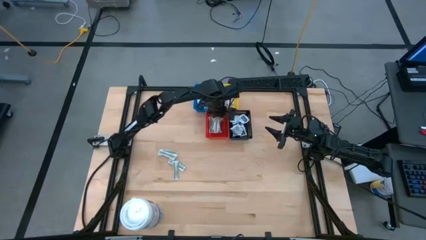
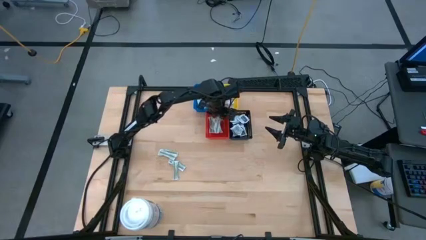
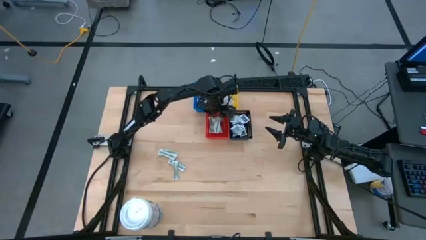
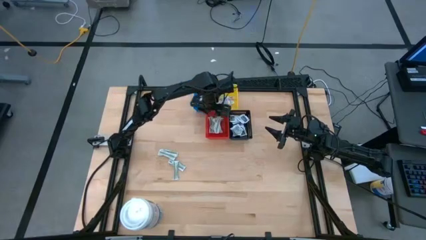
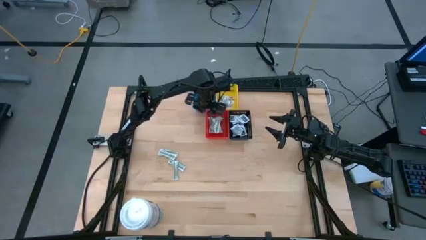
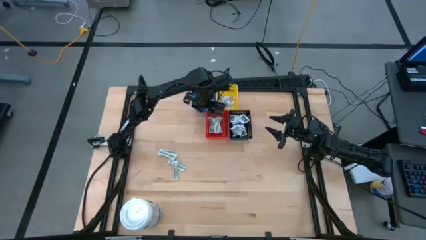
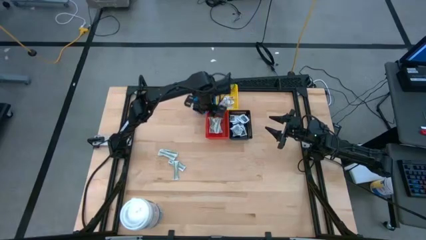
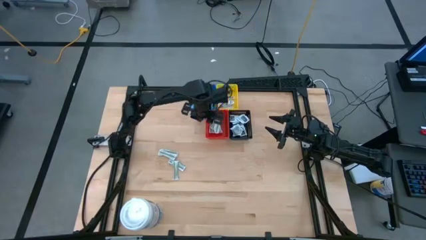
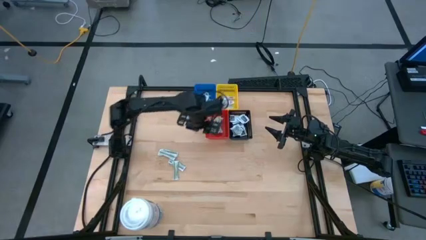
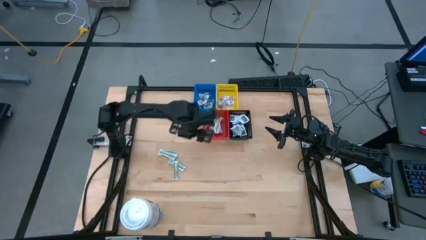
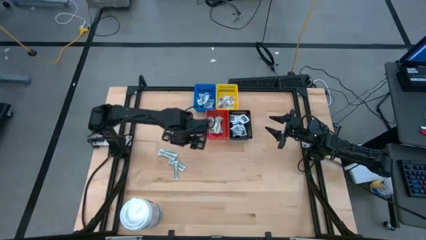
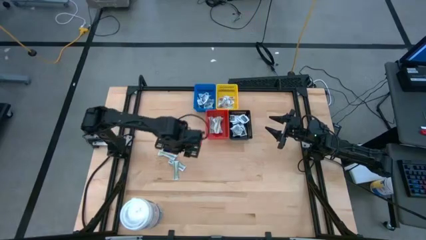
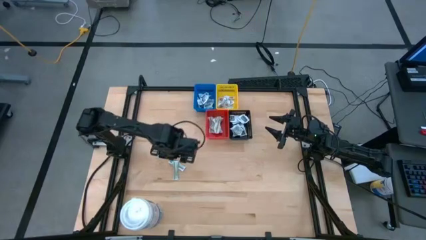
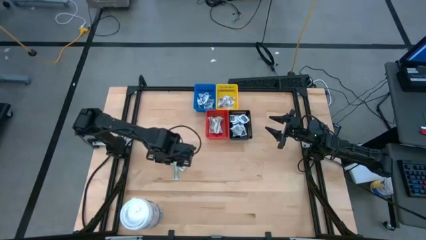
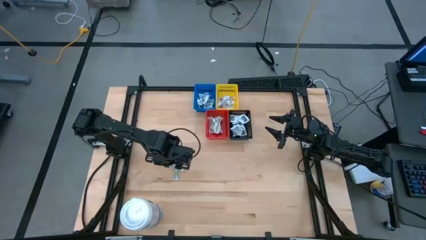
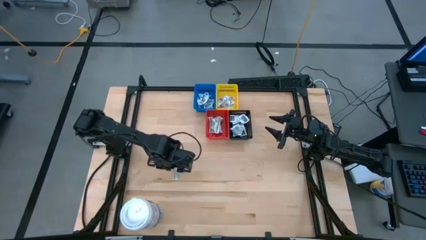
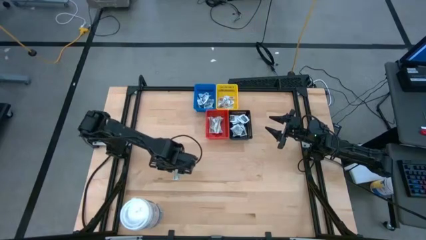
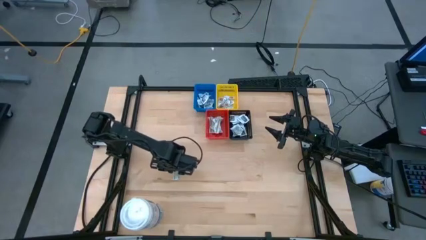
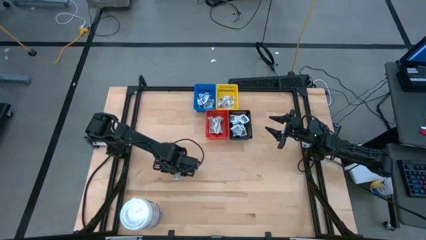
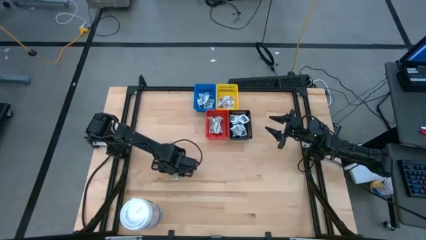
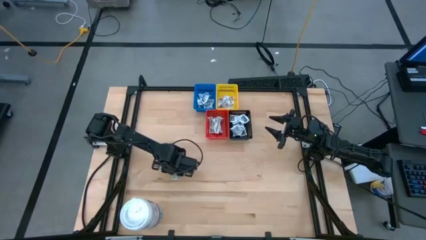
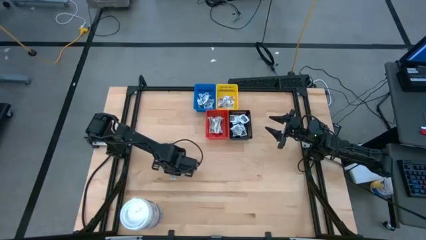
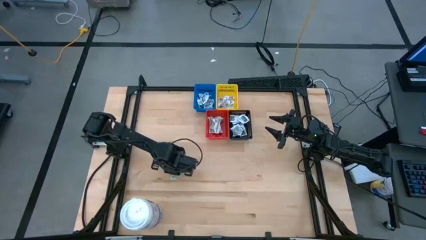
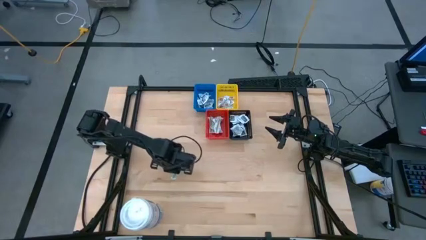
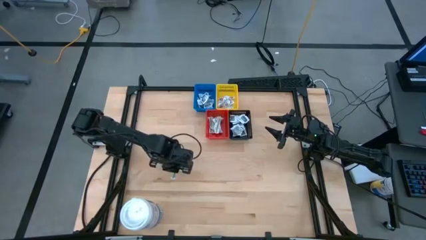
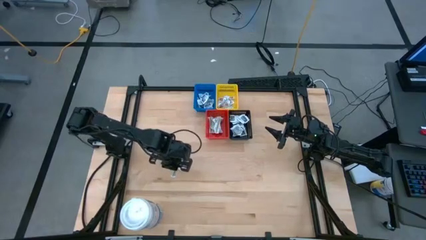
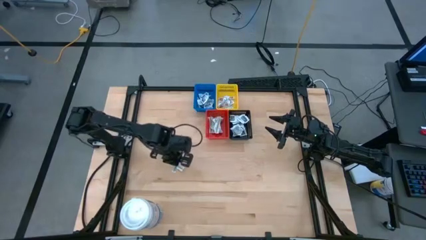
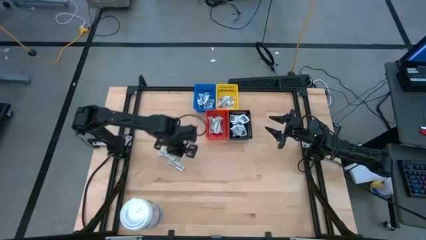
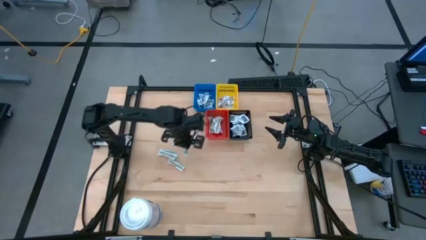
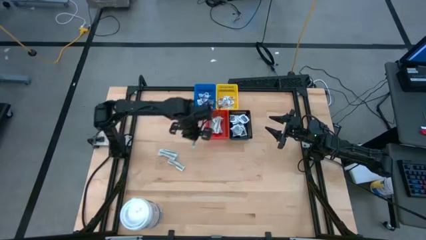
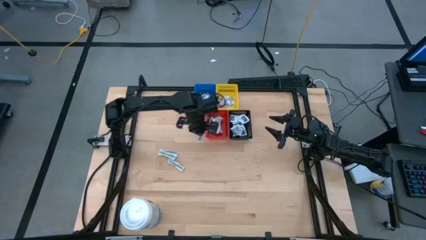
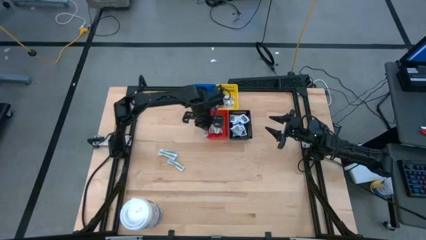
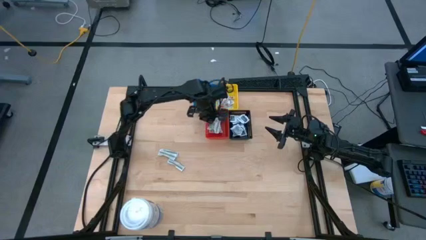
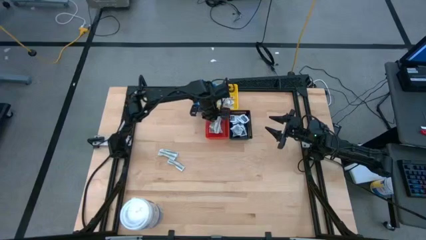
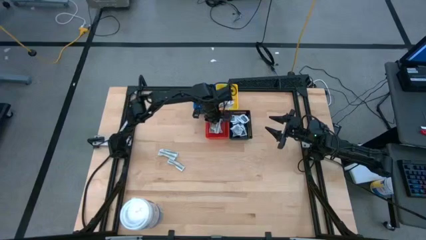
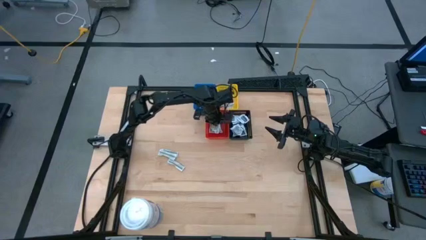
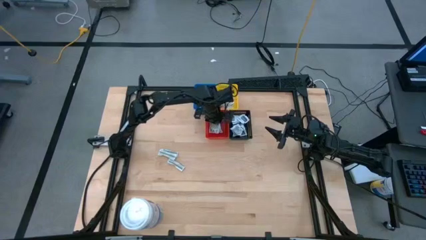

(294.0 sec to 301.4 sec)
Task: Pick & Place First Aid Supplies
Put the bandage pack into the red bin

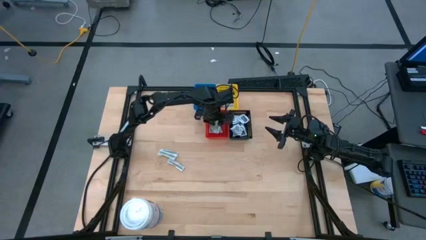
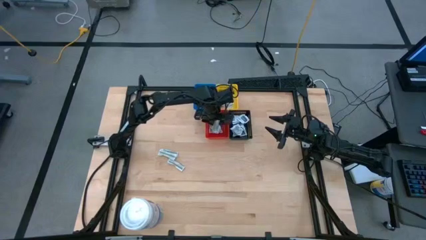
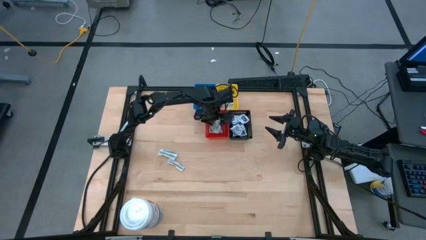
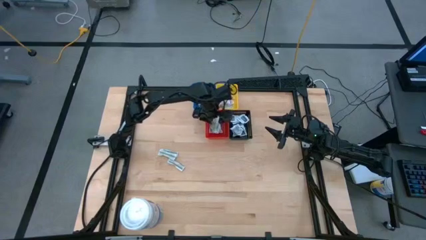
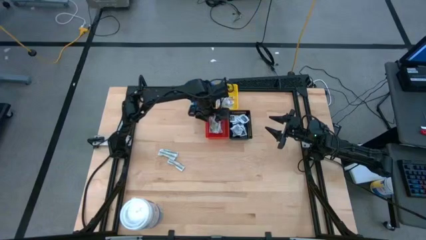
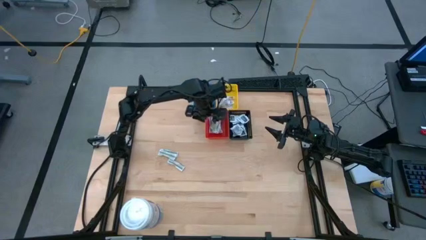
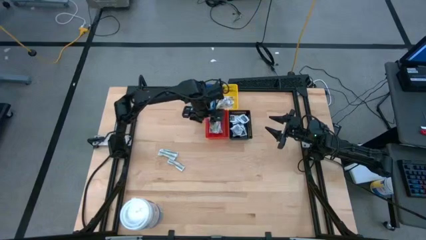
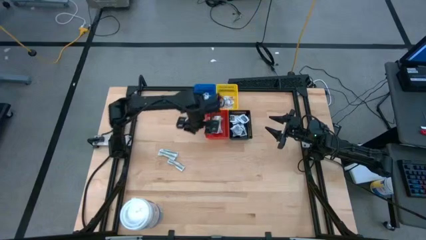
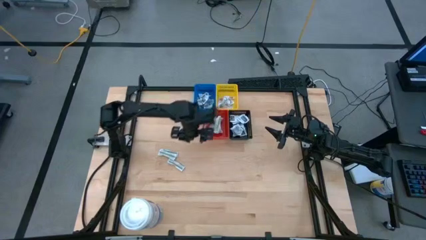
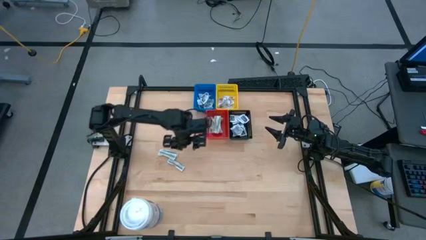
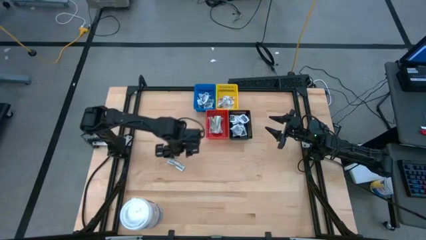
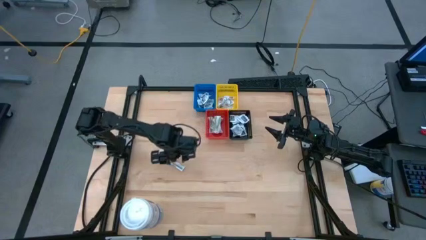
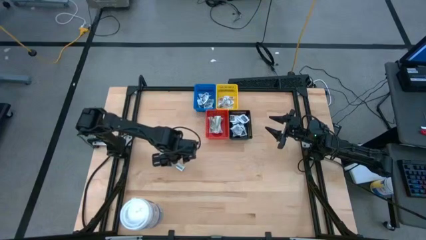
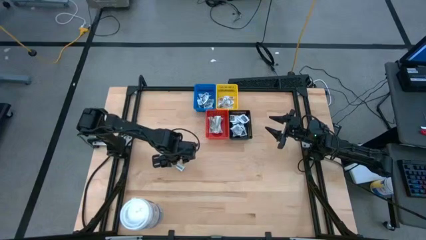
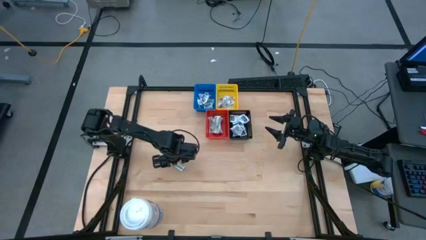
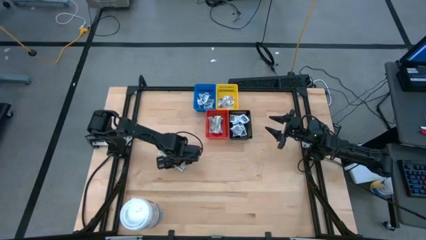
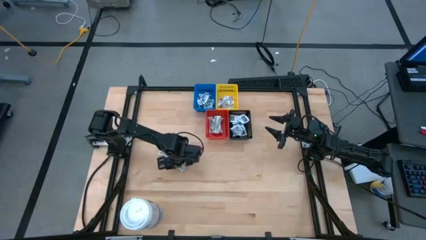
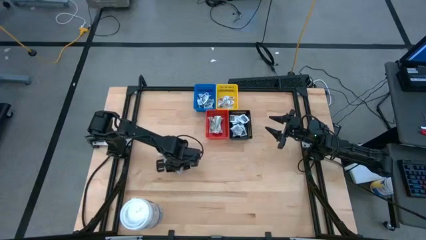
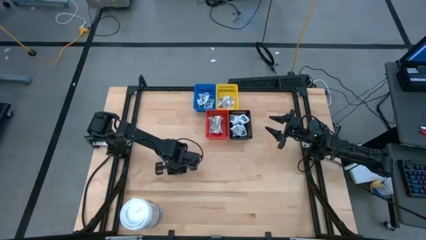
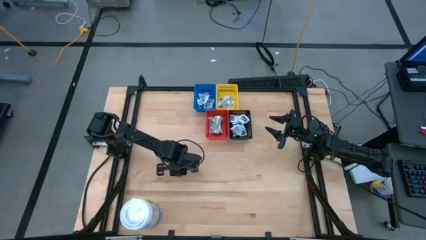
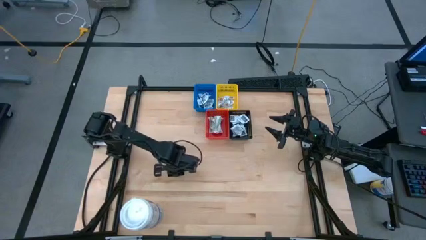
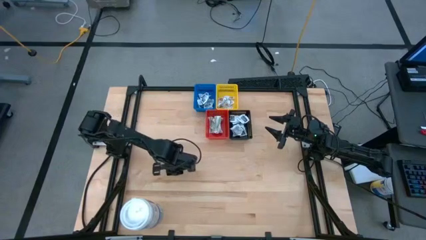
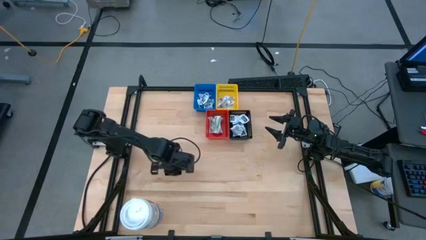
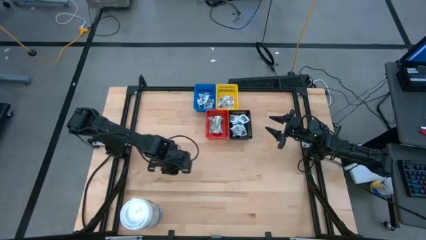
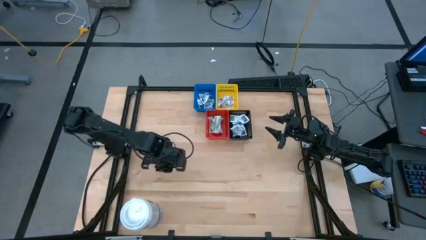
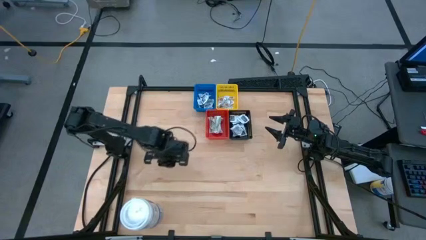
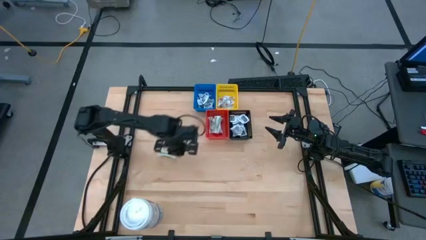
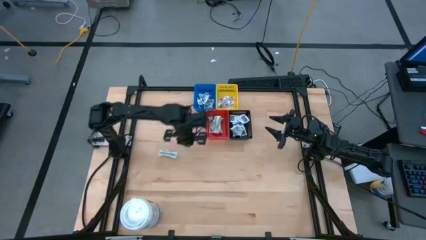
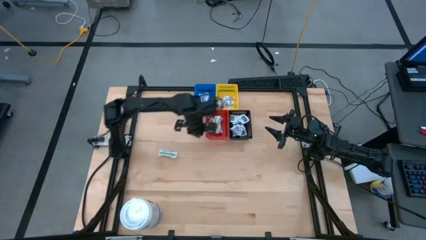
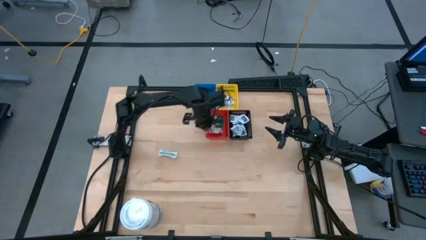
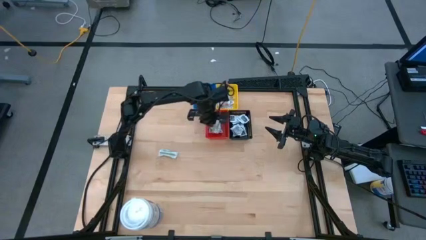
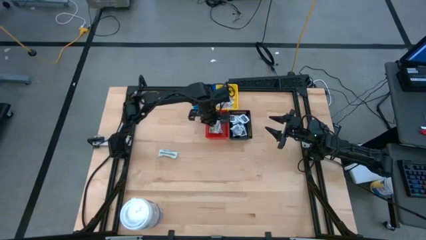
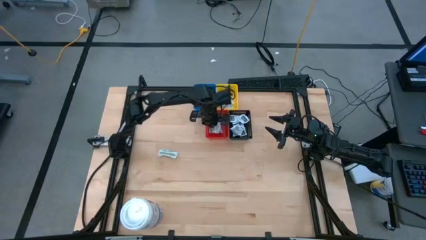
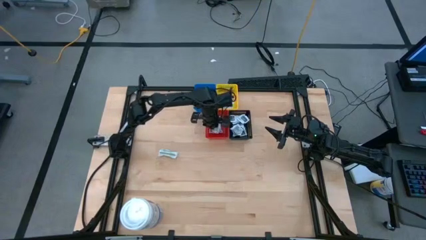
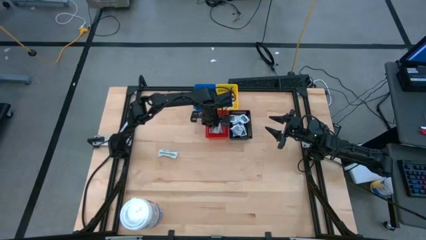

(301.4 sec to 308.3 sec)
Put the bottom bandage pack into the red bin

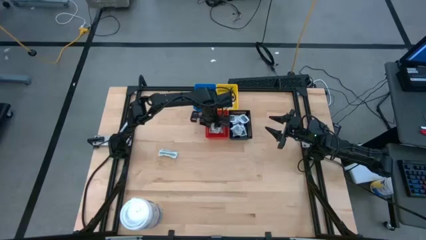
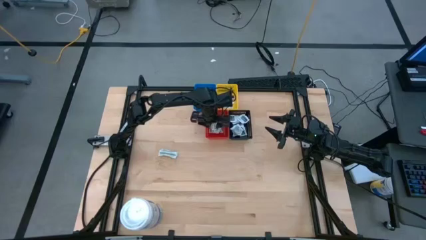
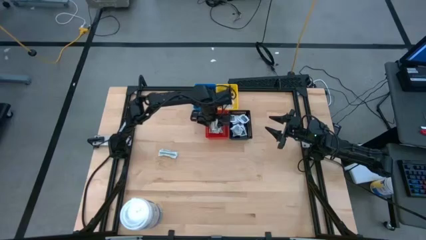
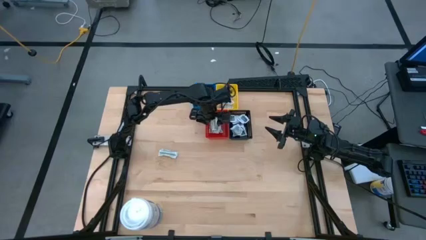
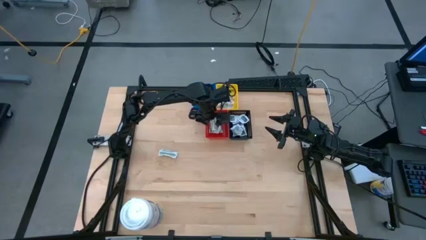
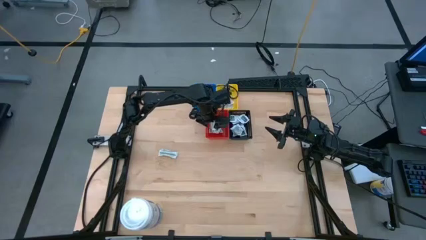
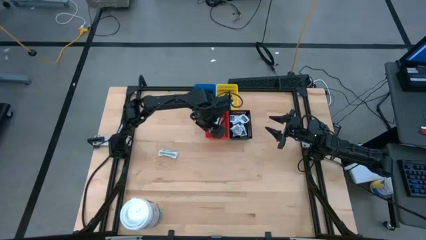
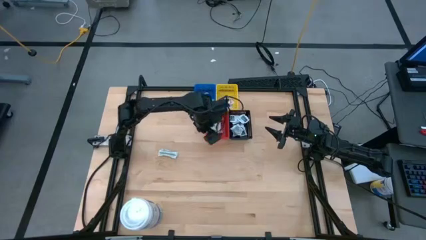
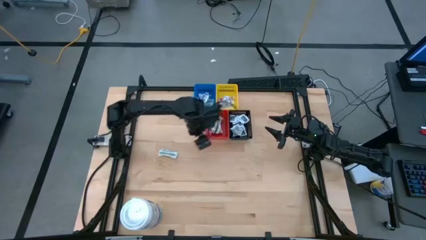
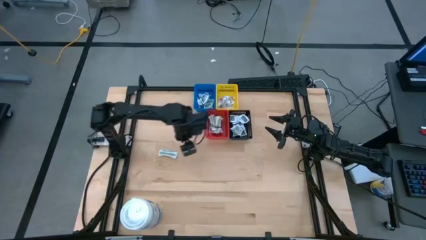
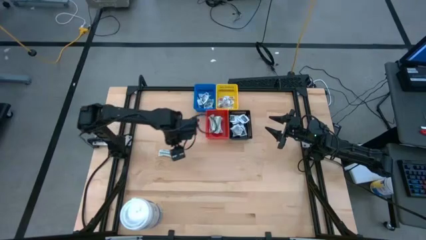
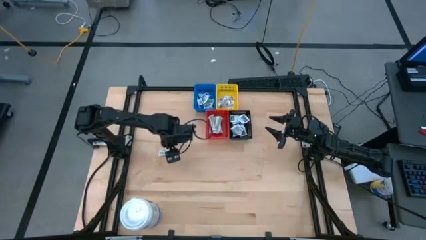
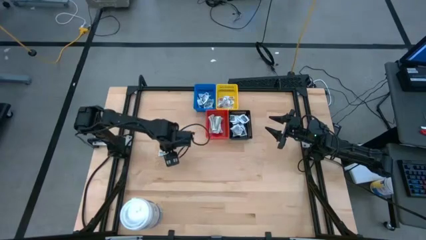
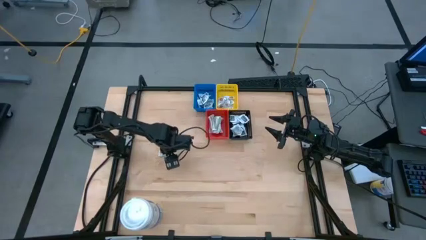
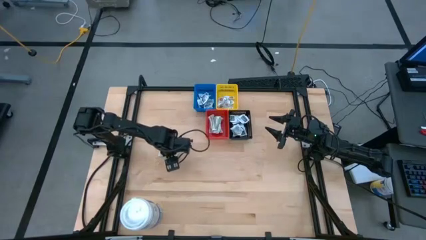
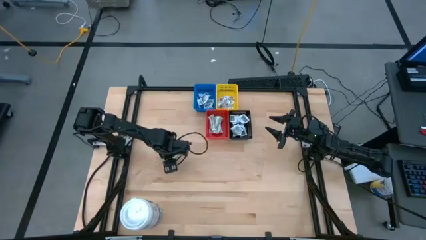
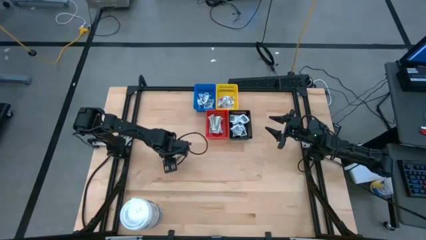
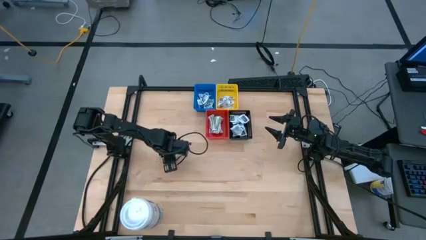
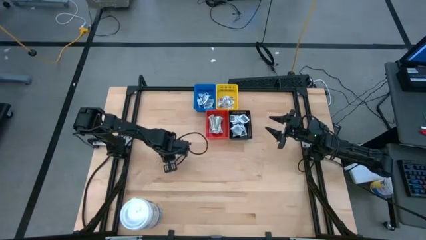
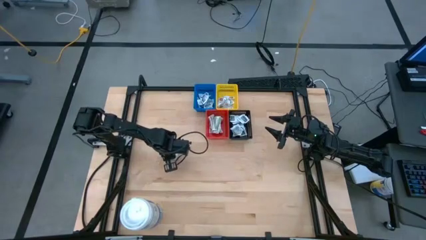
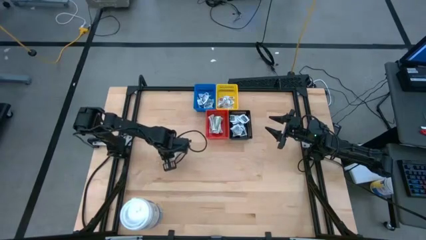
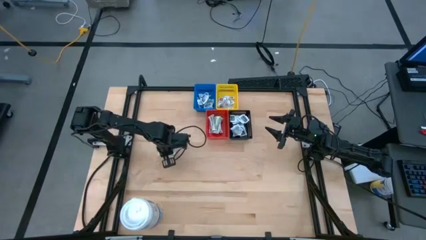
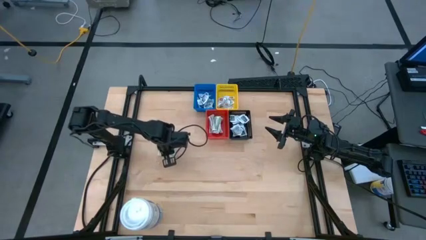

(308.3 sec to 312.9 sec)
Put the top bandage pack into the red bin
